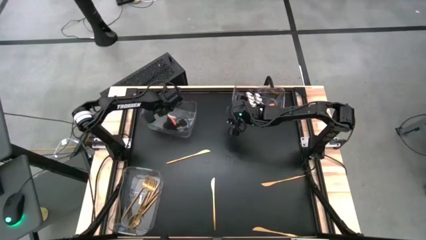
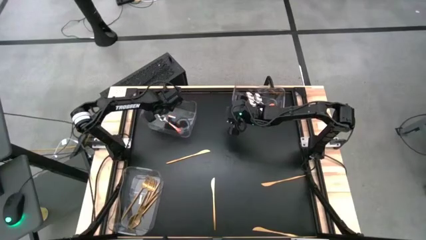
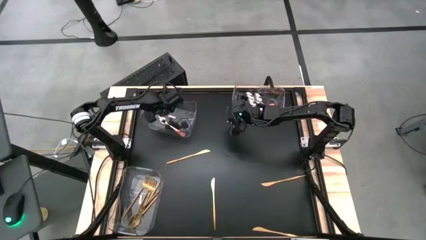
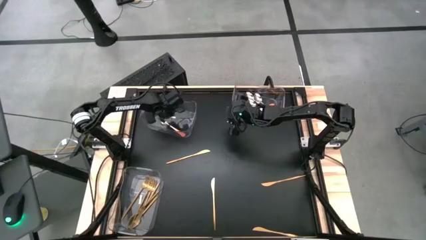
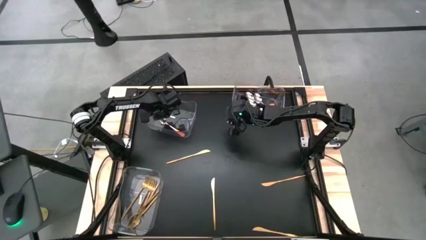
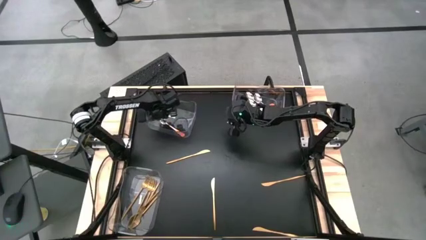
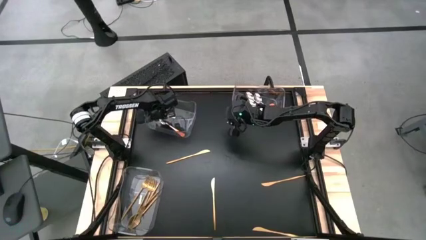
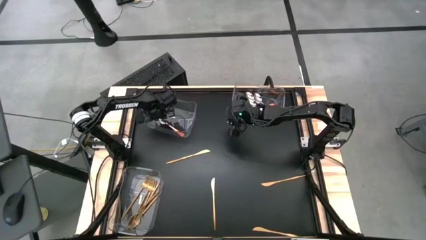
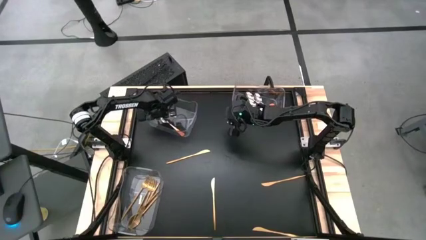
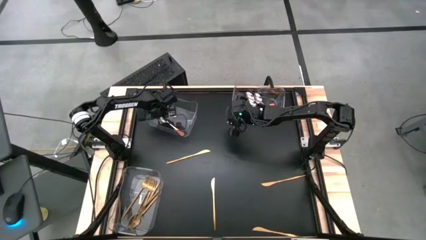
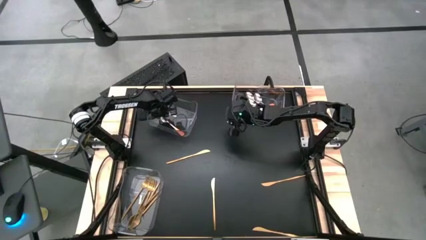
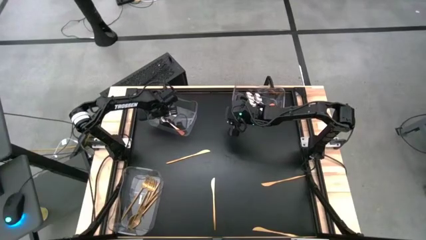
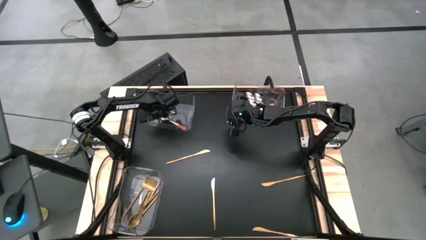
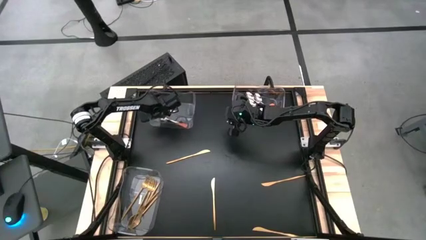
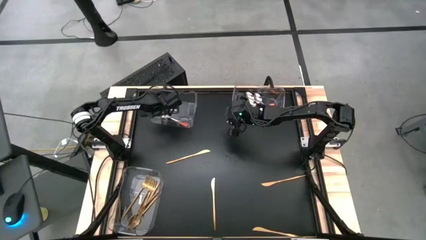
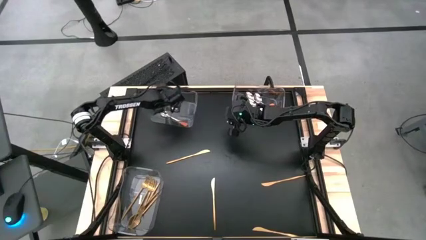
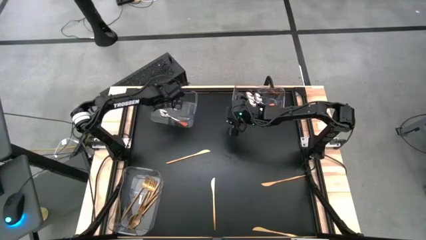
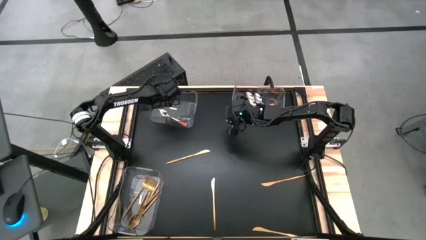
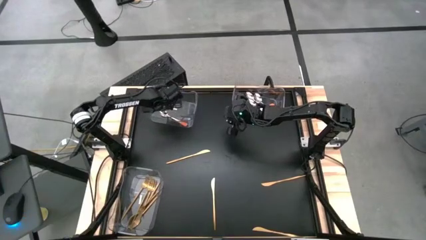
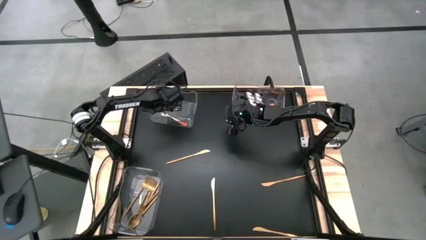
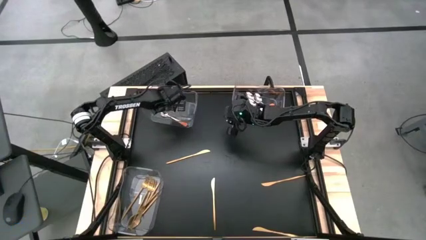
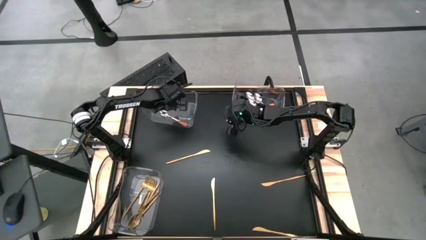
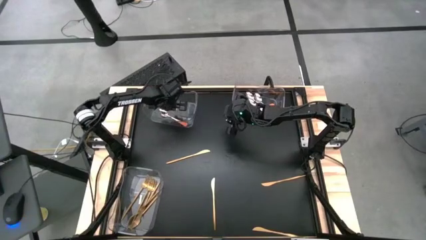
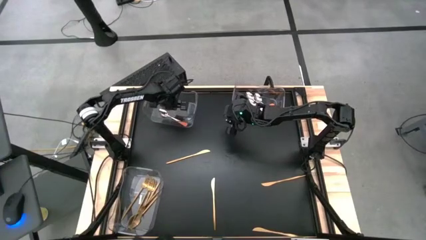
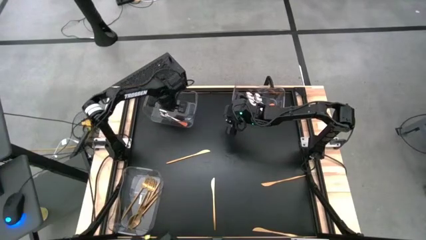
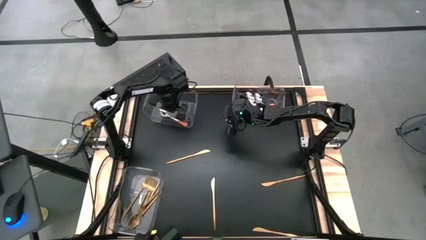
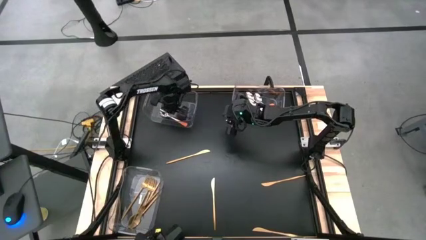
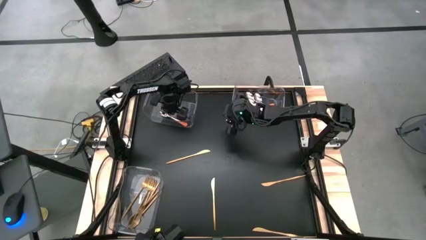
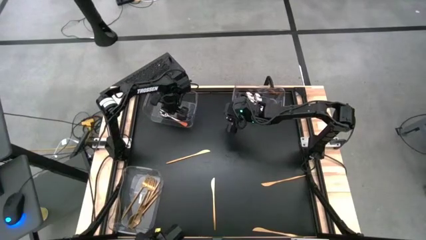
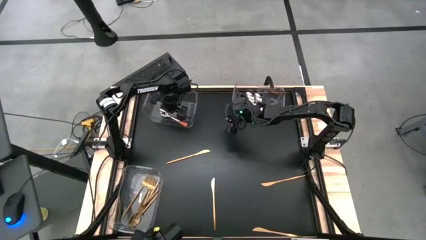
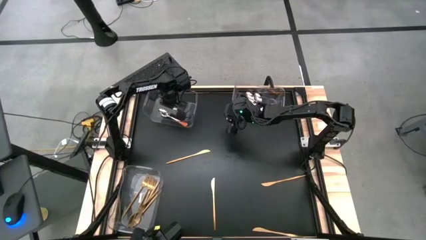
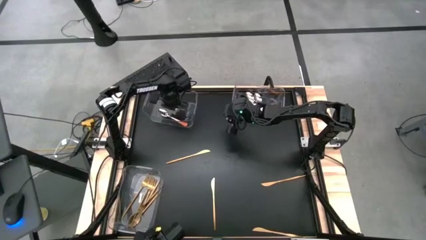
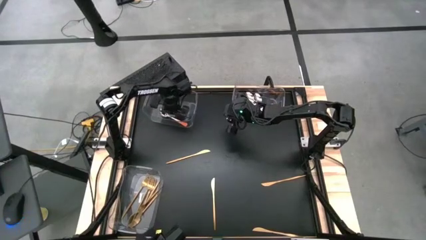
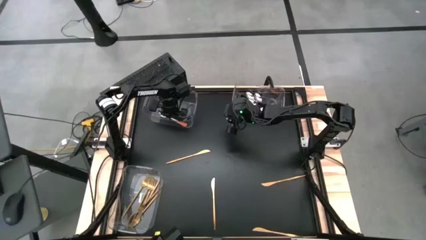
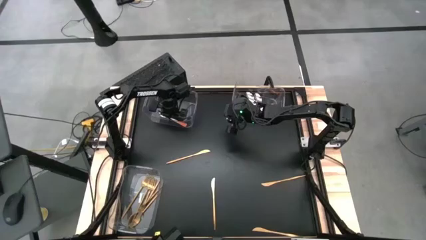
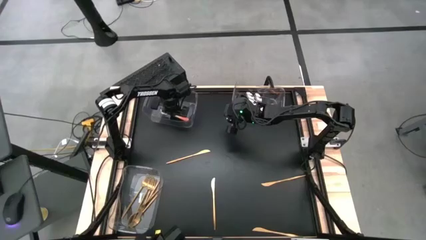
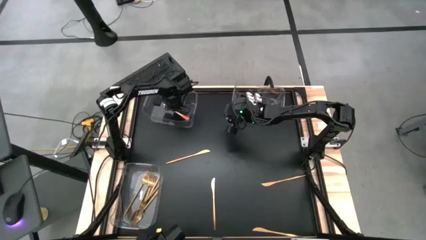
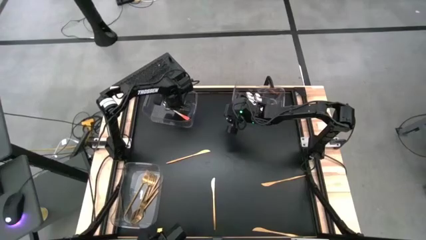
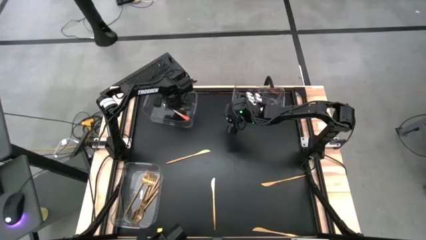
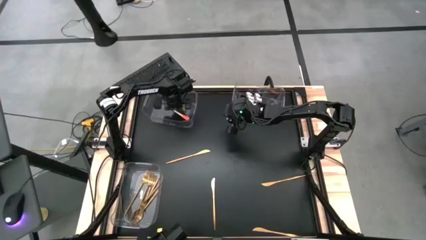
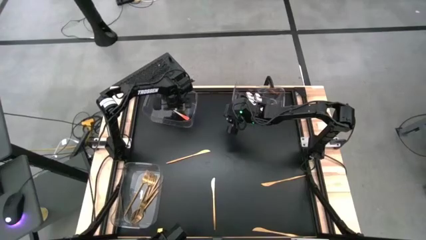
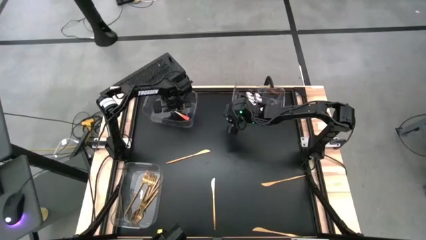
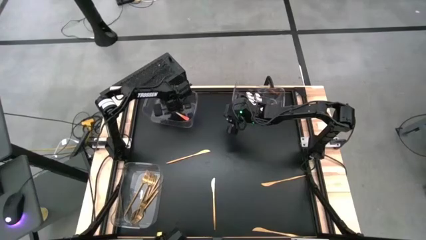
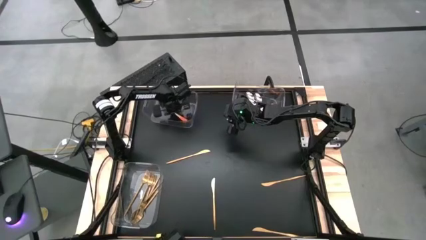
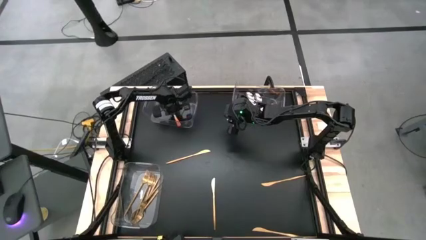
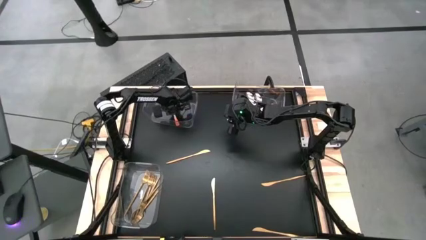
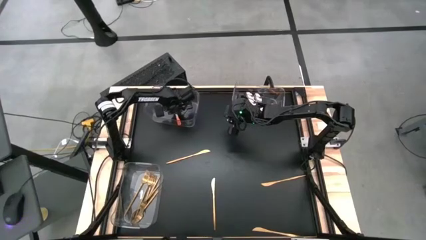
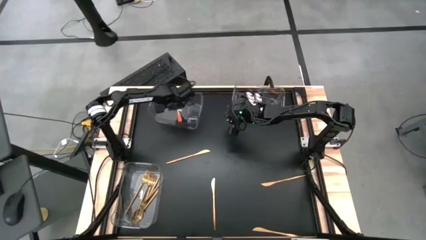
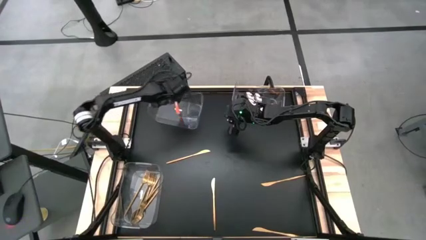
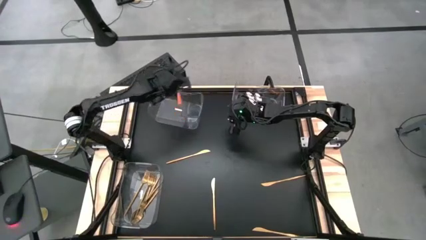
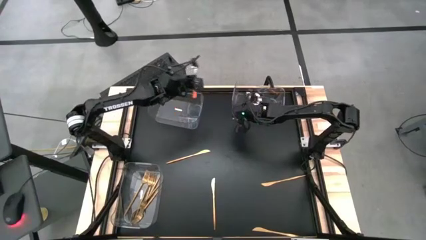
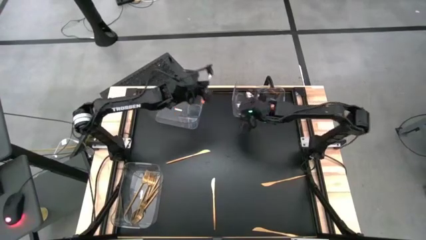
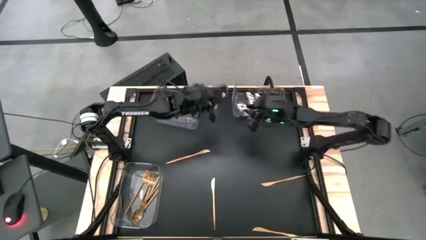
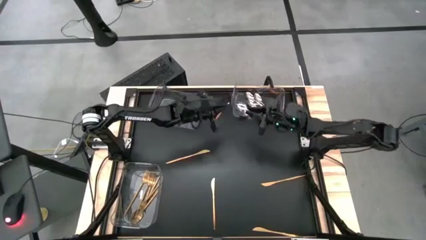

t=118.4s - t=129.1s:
Task: Sort silverware by color (type)
Remove the silver and orange spoon from the top left transparent bin

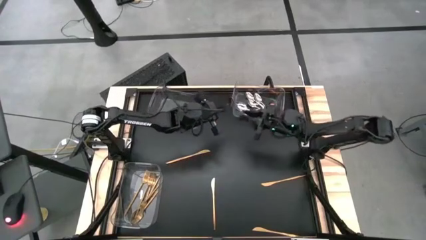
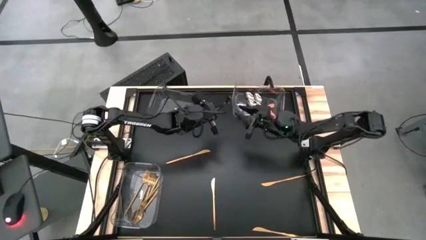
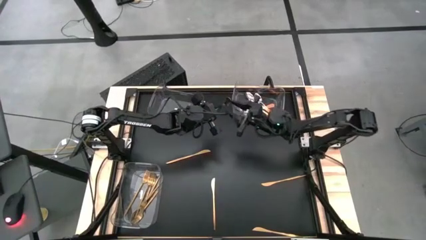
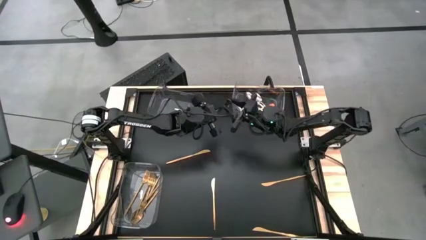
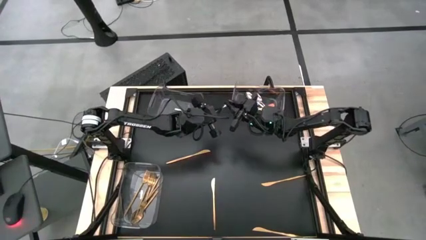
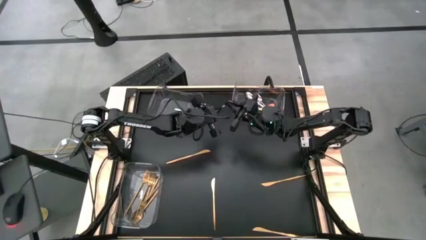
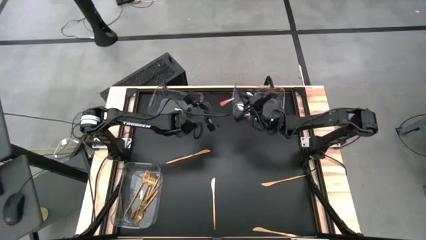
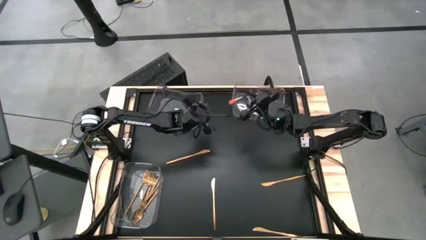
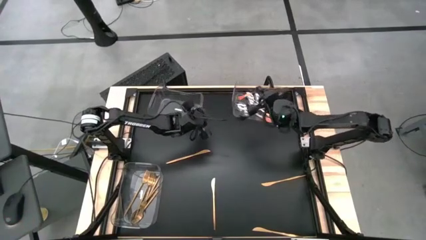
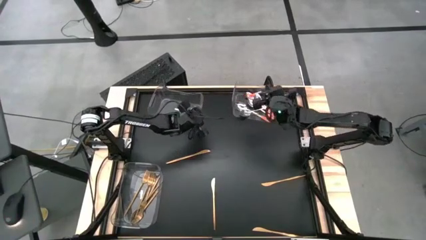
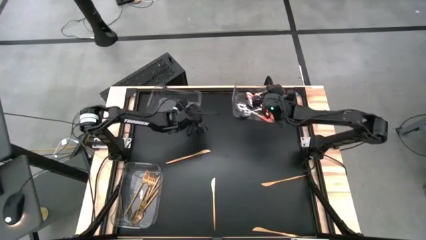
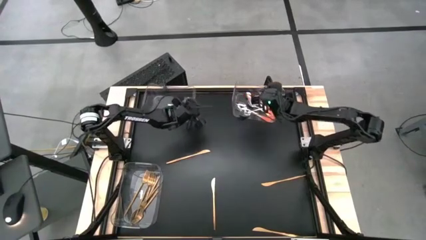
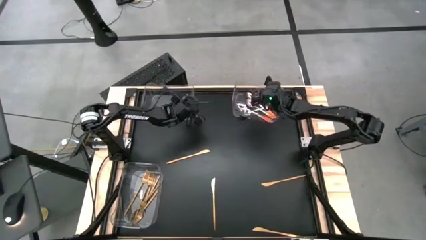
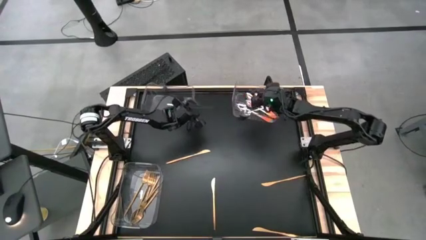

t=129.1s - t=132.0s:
Put the silver and orange spoon into the top right transparent bin
